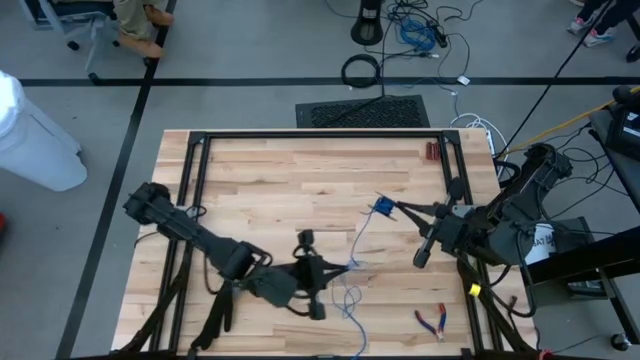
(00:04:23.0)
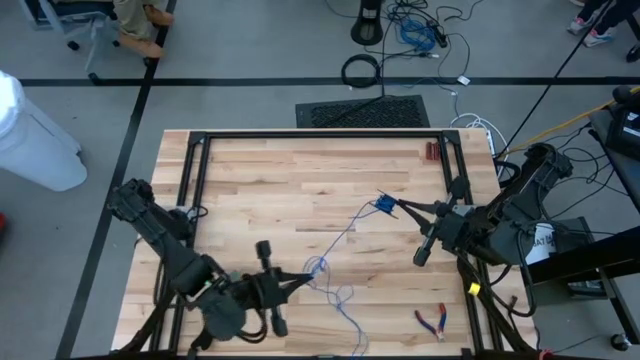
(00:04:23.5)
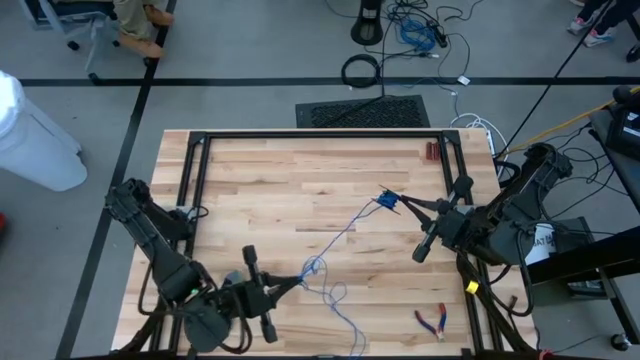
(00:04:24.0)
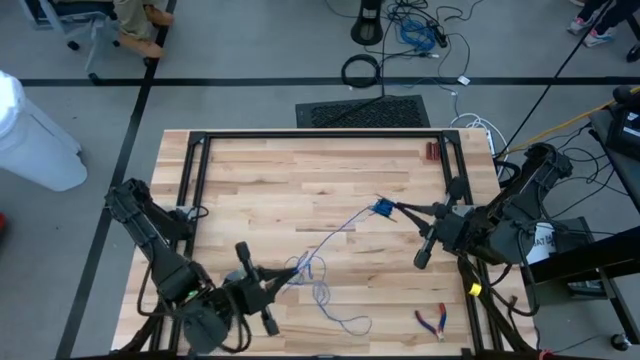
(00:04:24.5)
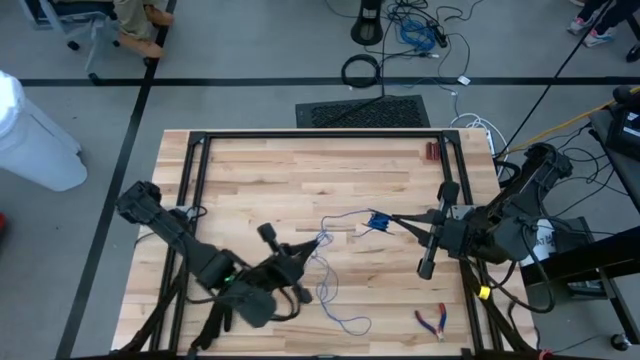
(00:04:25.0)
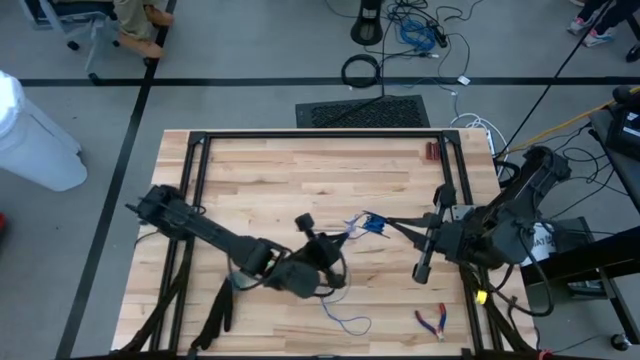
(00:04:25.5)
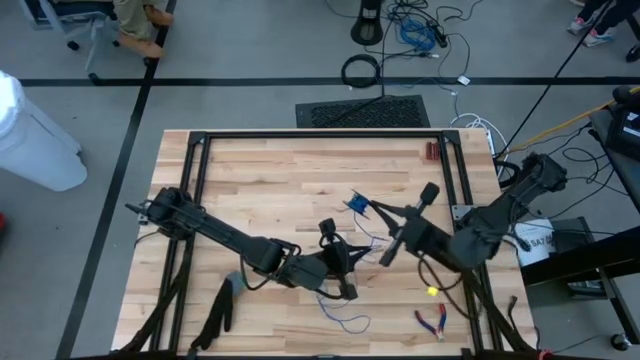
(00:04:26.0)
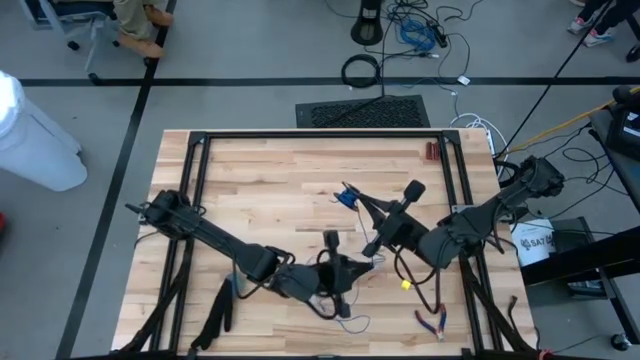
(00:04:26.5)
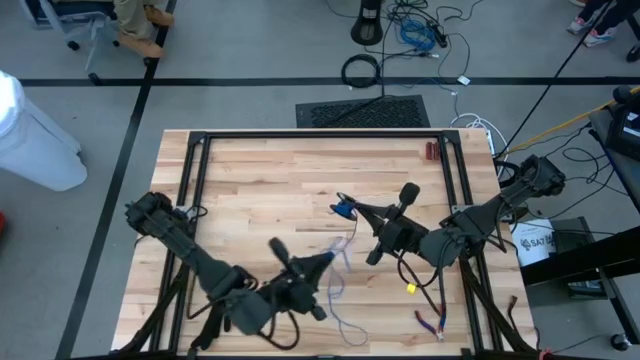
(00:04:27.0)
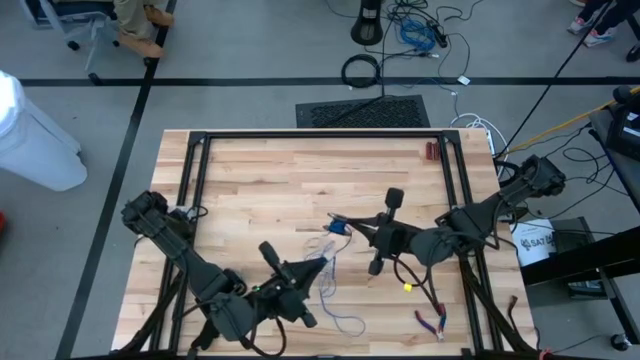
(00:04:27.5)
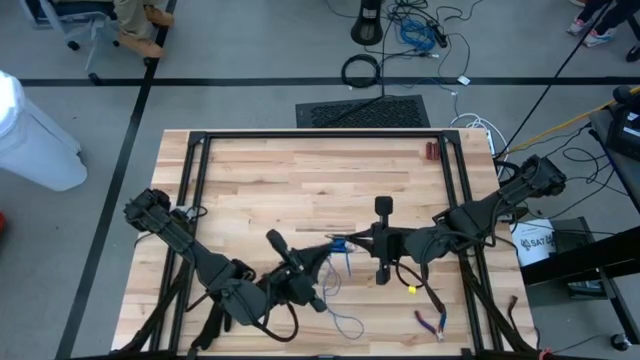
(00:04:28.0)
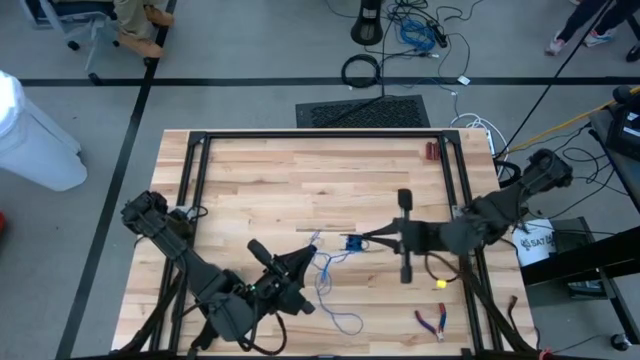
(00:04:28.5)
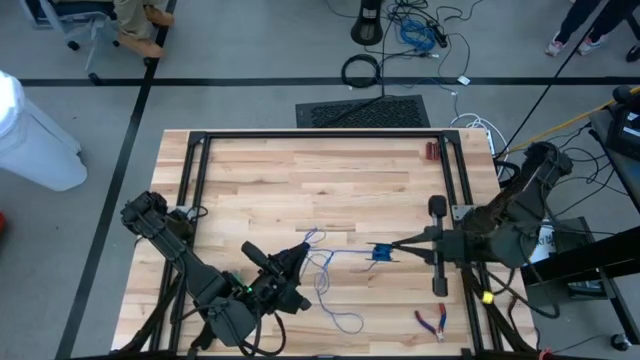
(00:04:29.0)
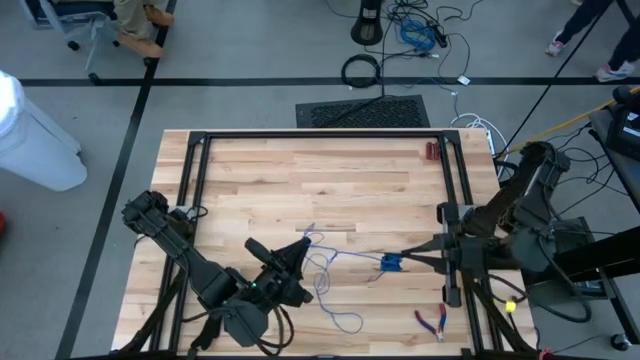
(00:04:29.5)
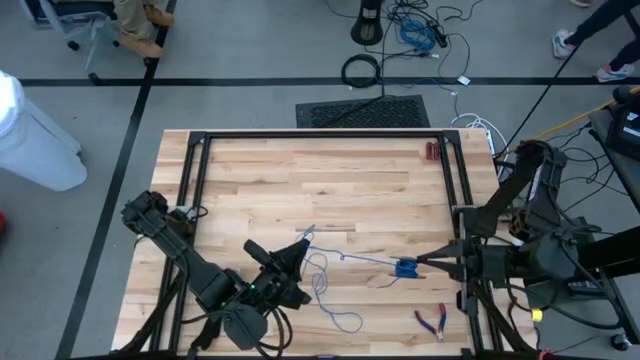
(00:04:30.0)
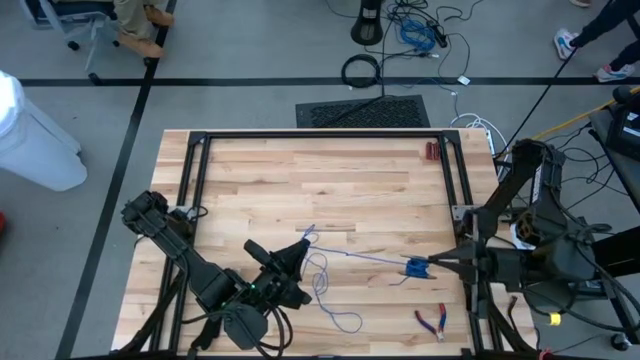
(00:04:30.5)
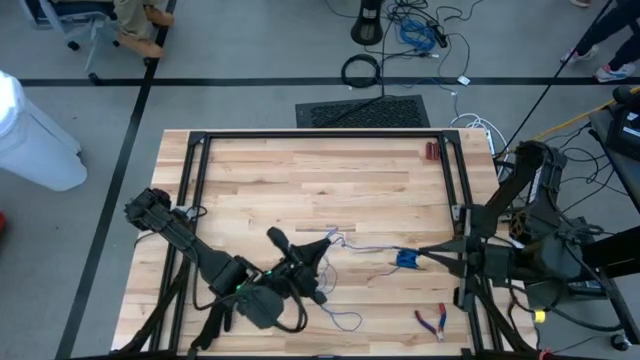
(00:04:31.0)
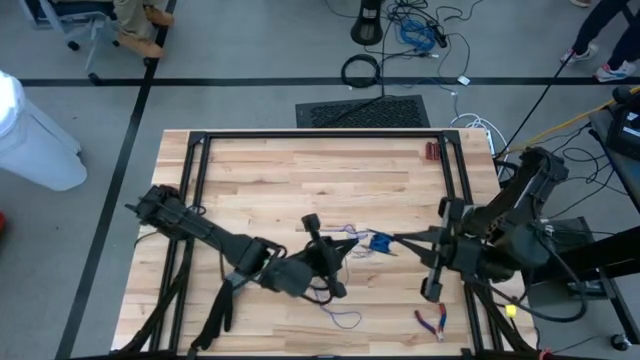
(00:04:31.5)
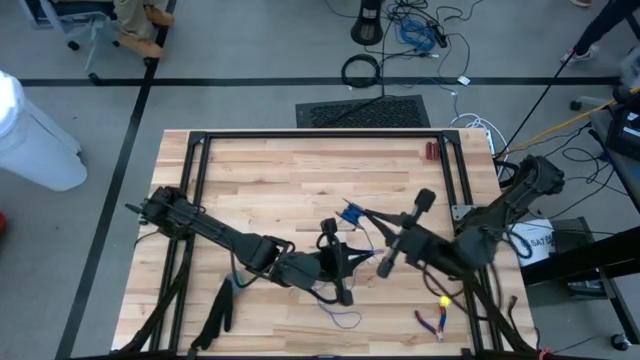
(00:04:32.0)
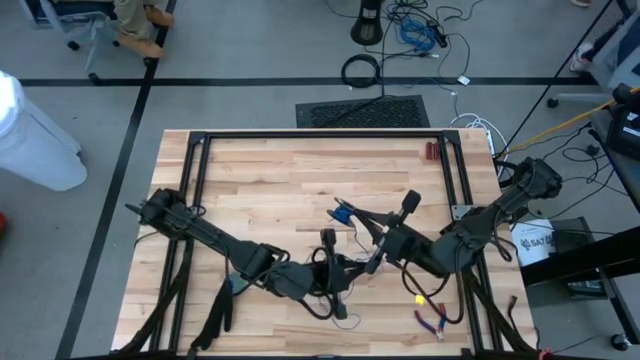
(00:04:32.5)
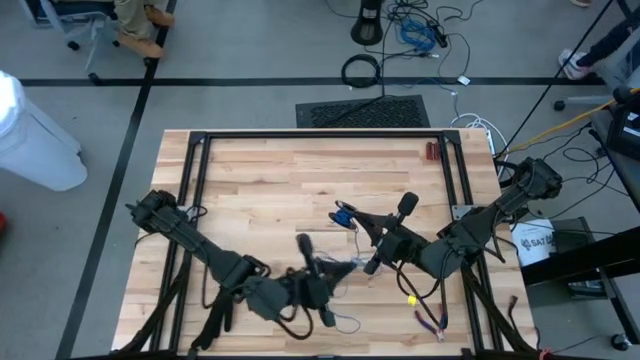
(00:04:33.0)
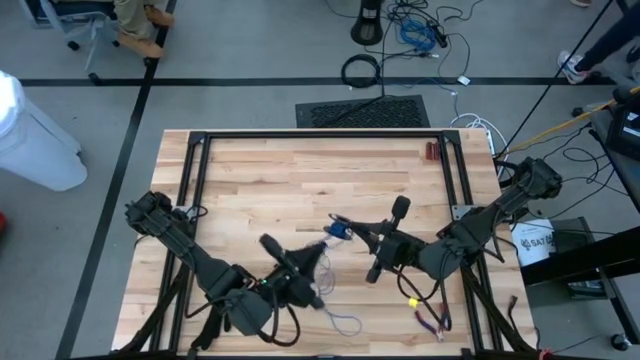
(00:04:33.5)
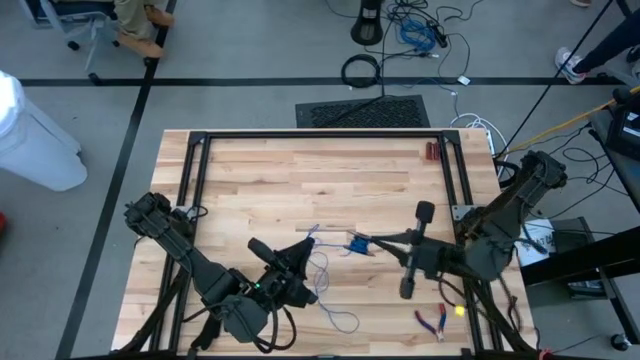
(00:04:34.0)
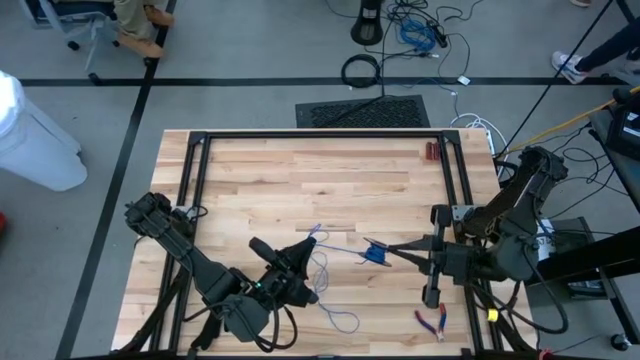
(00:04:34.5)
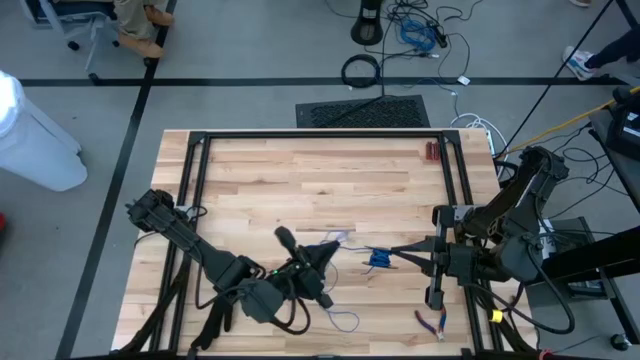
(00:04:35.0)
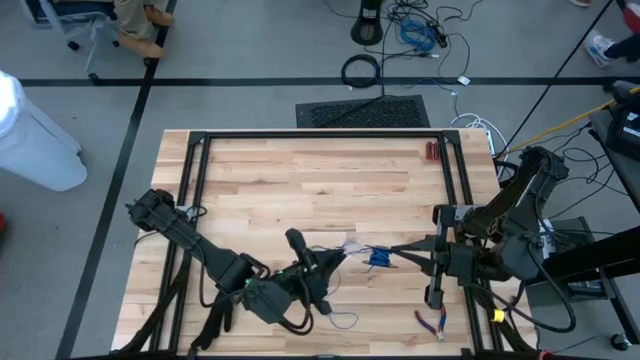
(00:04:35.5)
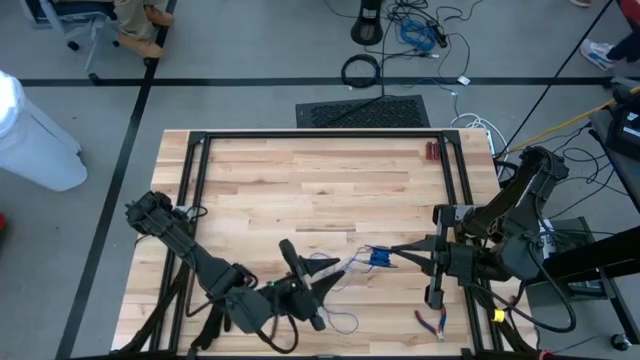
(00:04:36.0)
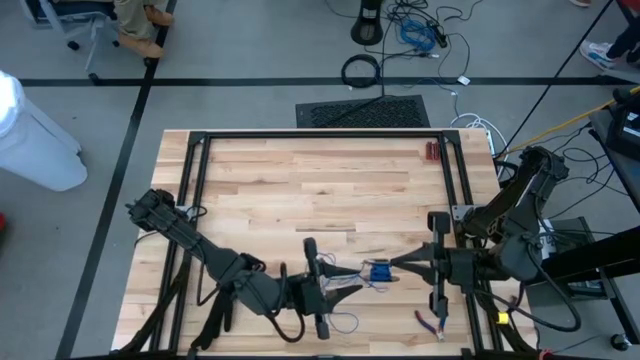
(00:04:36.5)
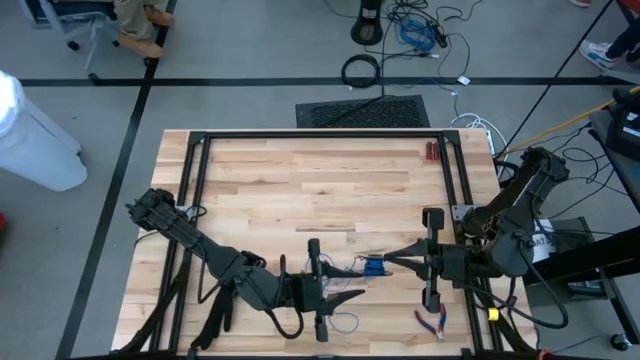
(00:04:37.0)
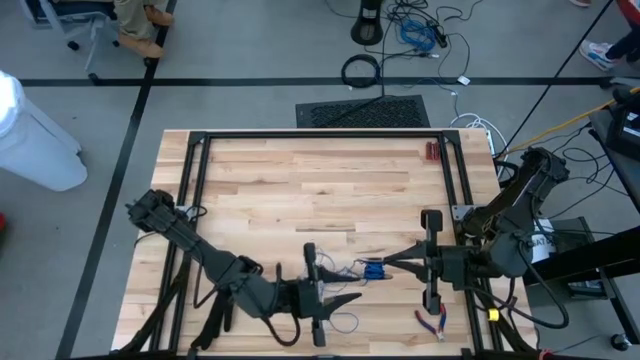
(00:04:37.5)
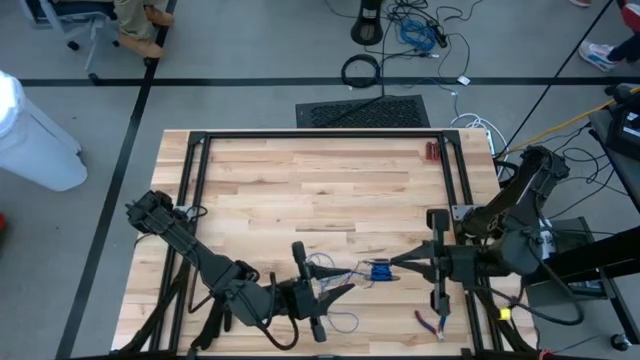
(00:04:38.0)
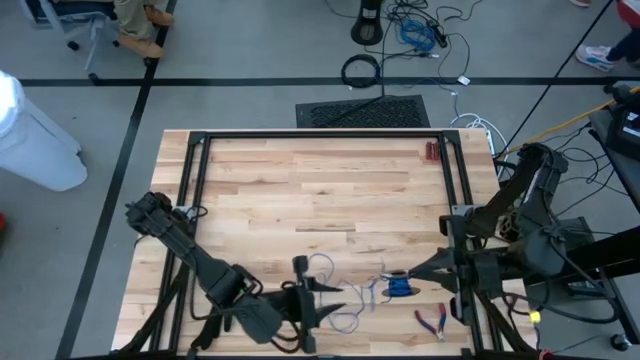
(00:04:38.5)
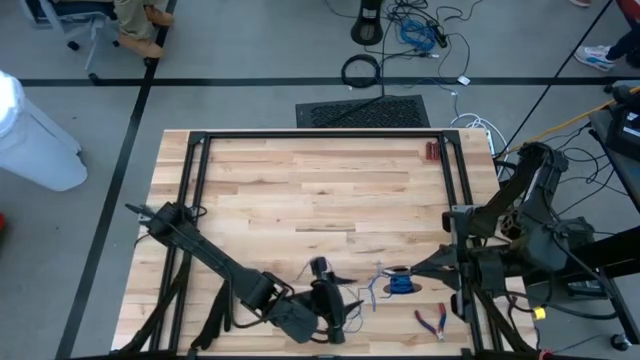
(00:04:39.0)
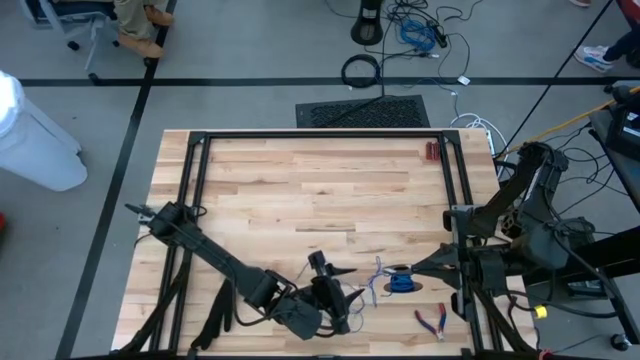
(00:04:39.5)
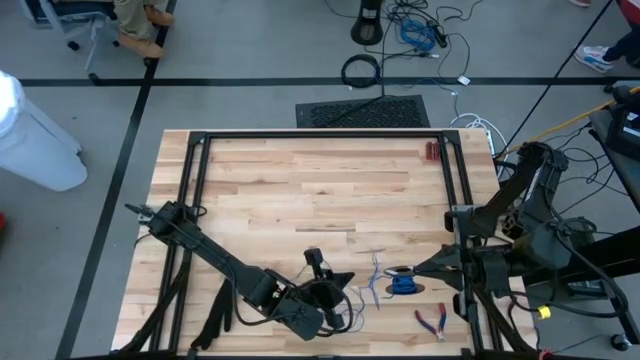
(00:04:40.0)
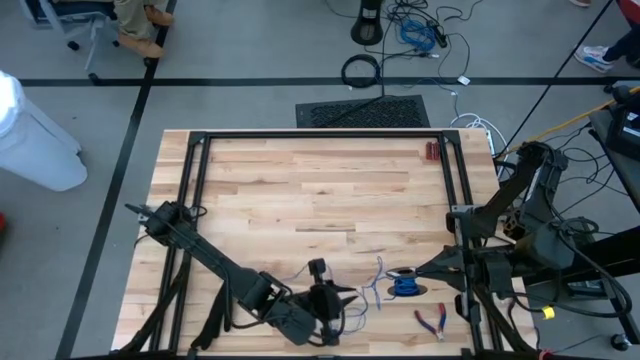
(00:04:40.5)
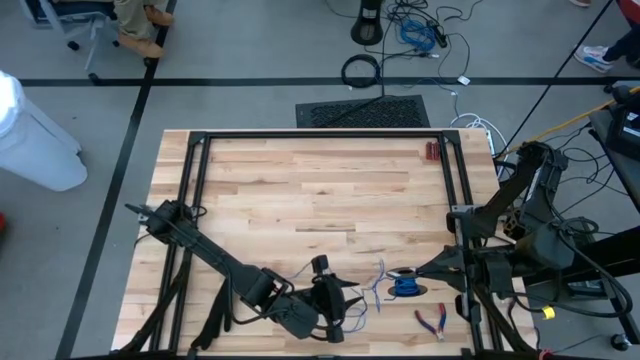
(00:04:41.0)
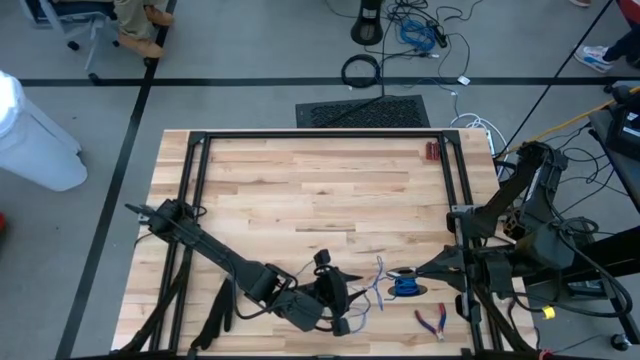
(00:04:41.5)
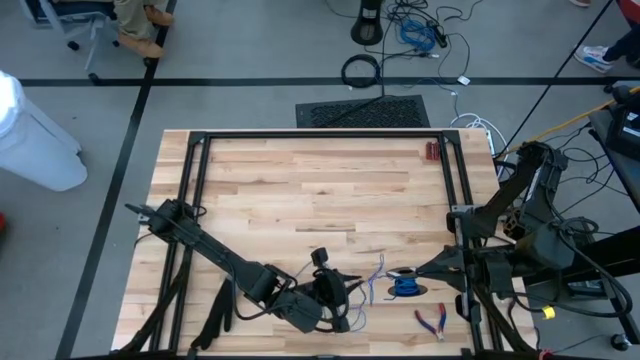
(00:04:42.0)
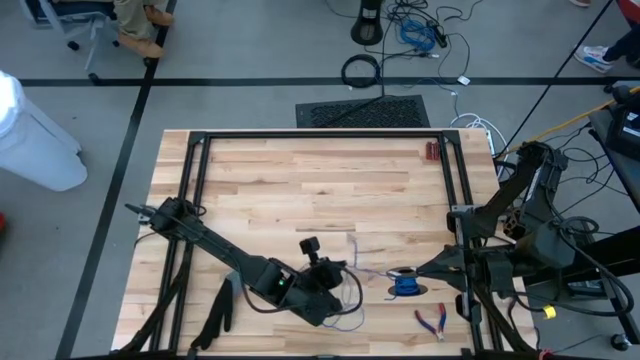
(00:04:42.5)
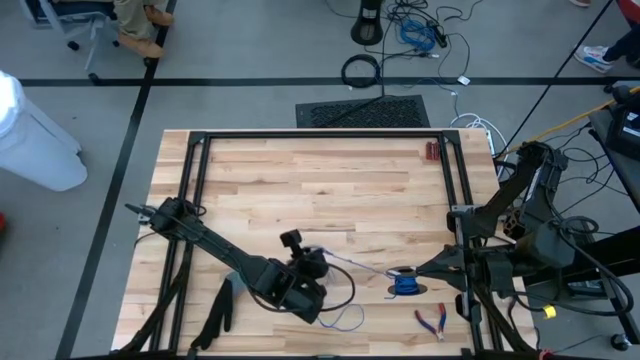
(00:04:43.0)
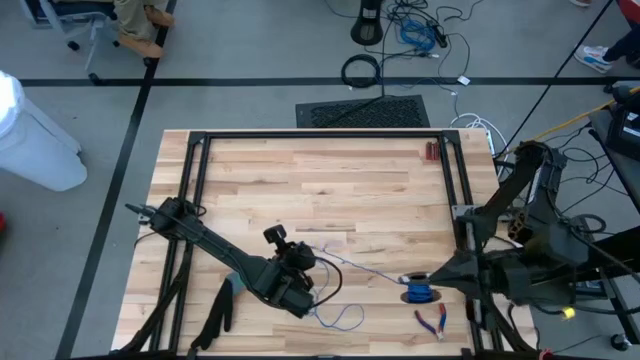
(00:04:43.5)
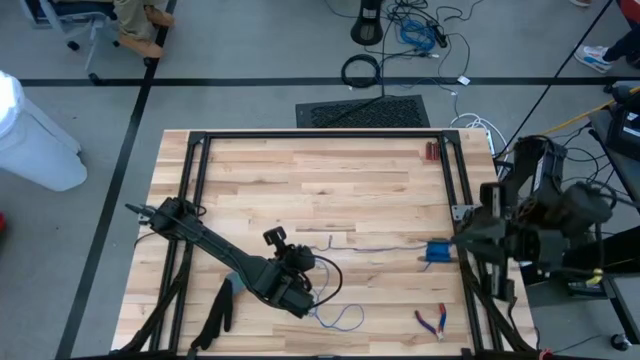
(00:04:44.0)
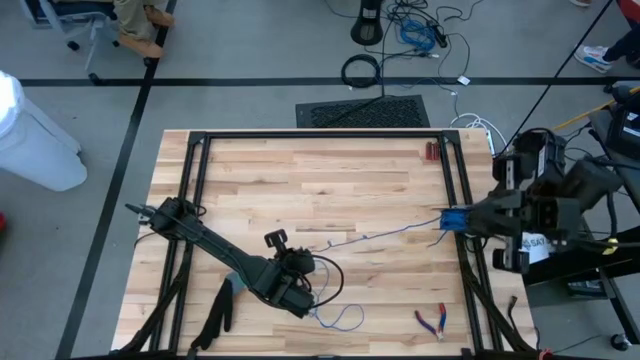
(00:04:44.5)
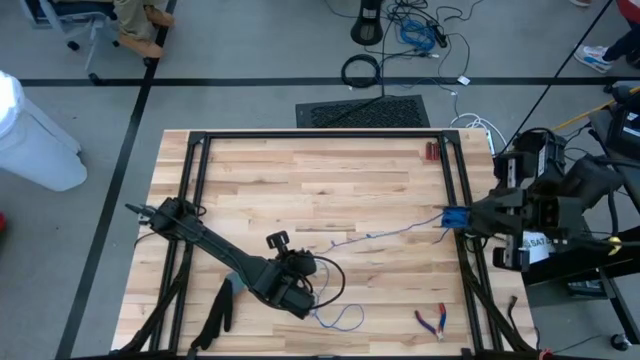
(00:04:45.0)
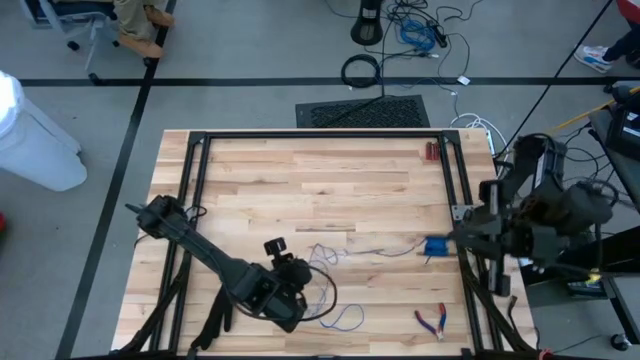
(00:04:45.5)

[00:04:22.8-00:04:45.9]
Task: Coil cords
Coil the blue wire onto the black spool
